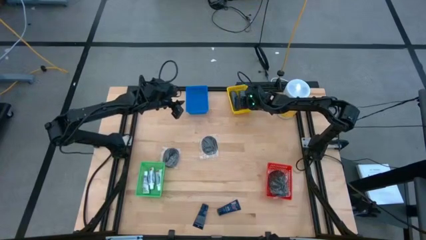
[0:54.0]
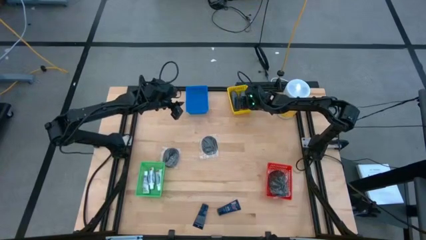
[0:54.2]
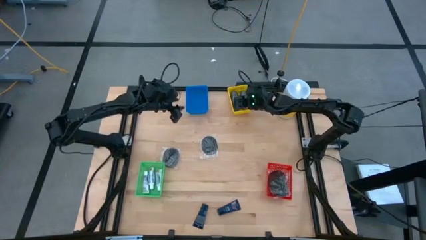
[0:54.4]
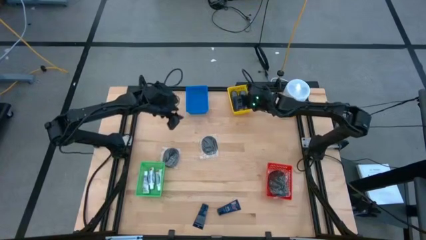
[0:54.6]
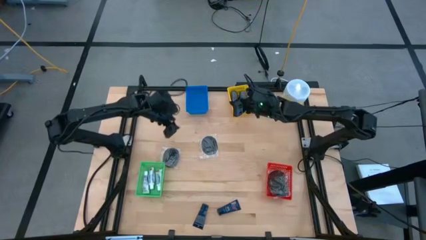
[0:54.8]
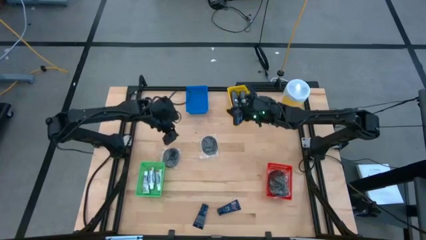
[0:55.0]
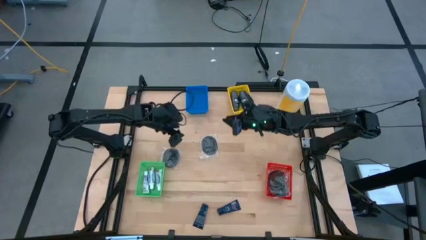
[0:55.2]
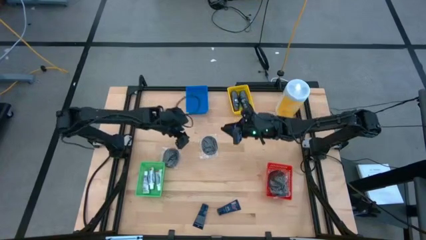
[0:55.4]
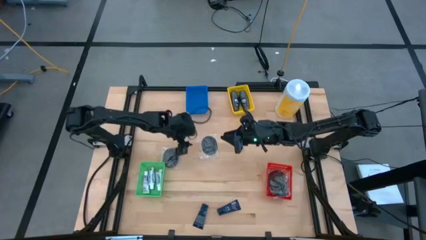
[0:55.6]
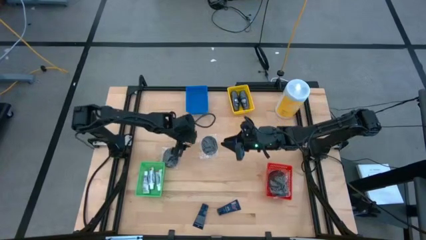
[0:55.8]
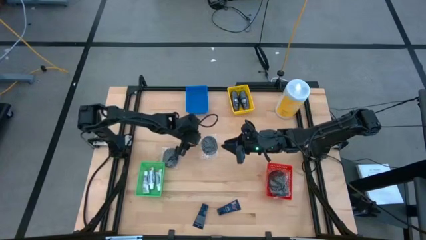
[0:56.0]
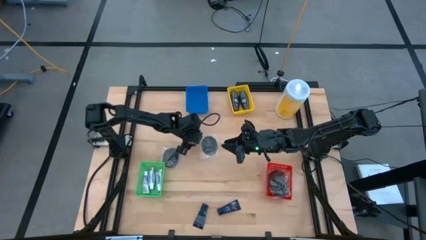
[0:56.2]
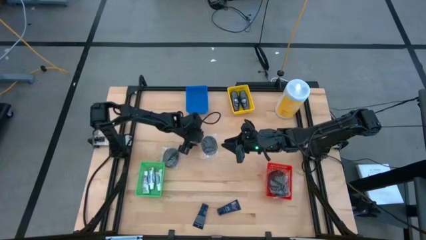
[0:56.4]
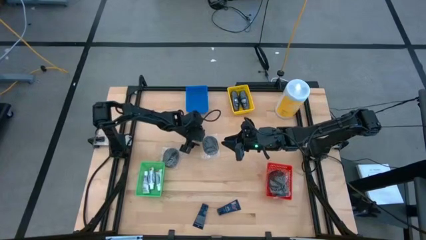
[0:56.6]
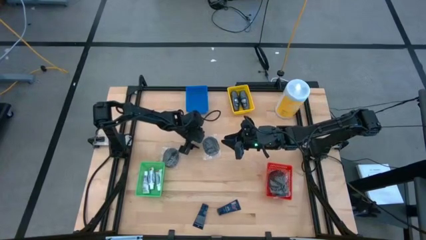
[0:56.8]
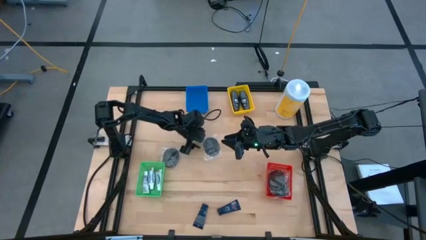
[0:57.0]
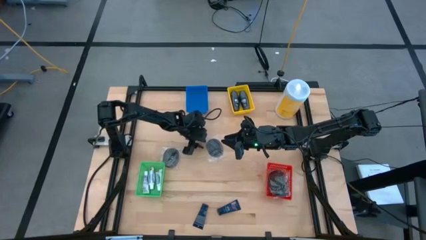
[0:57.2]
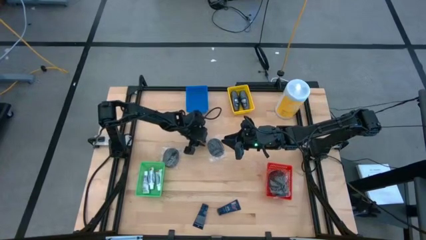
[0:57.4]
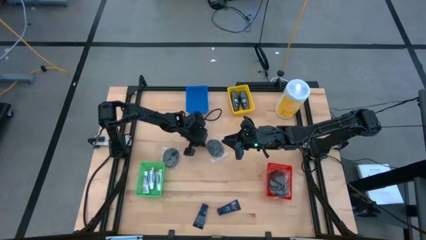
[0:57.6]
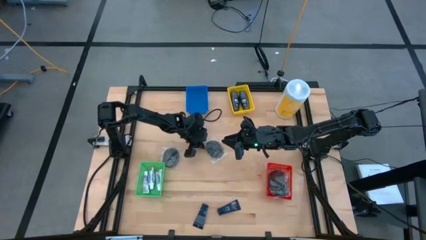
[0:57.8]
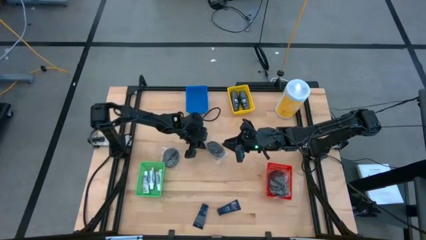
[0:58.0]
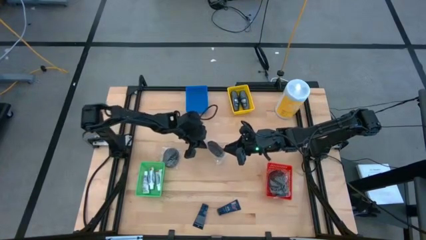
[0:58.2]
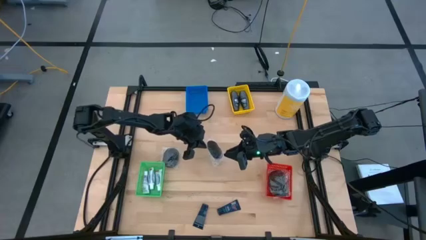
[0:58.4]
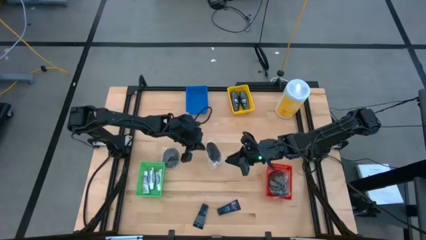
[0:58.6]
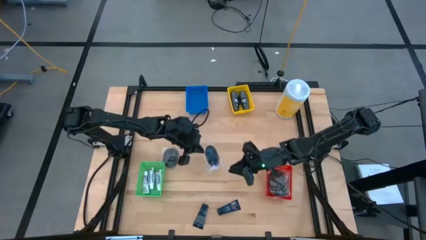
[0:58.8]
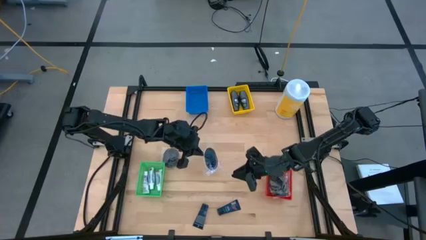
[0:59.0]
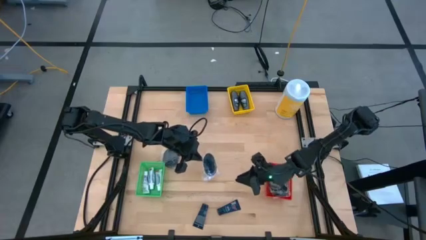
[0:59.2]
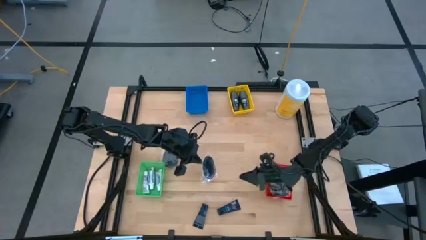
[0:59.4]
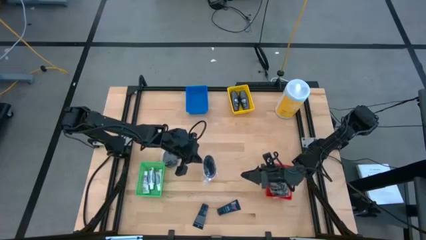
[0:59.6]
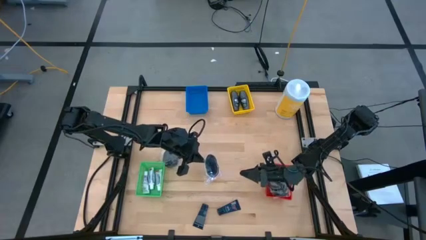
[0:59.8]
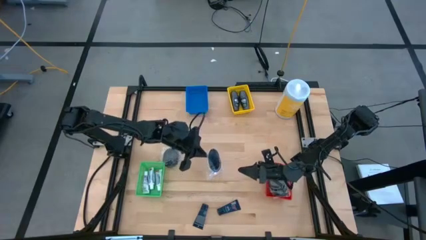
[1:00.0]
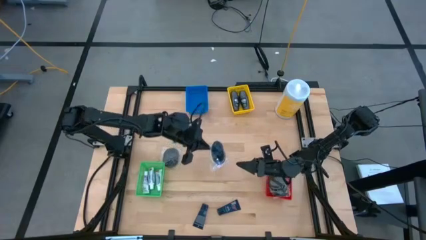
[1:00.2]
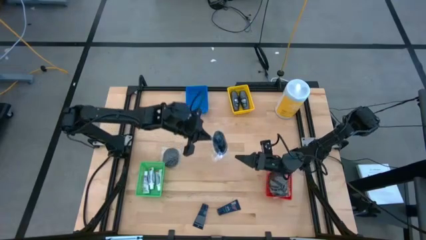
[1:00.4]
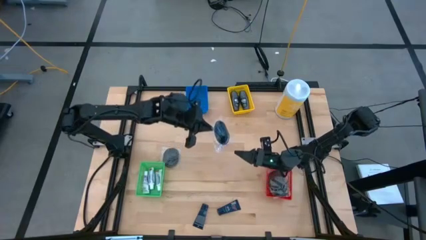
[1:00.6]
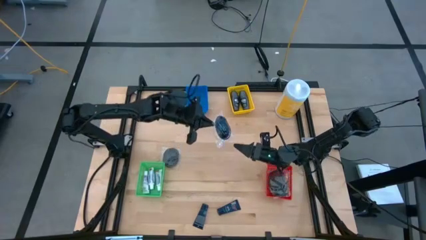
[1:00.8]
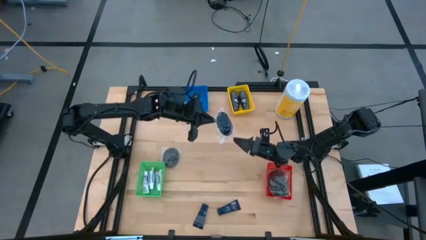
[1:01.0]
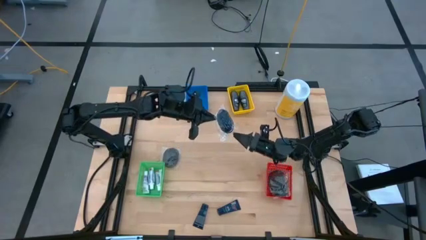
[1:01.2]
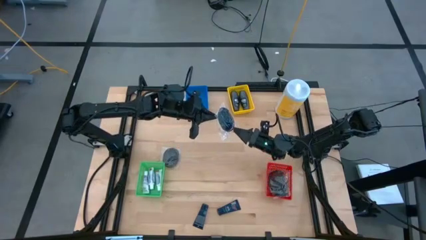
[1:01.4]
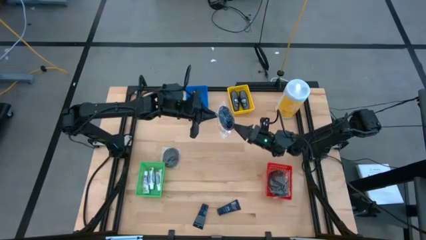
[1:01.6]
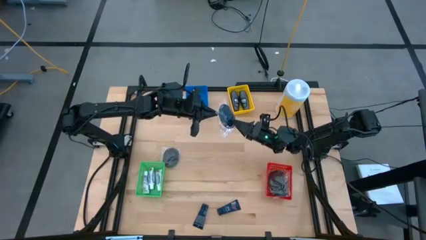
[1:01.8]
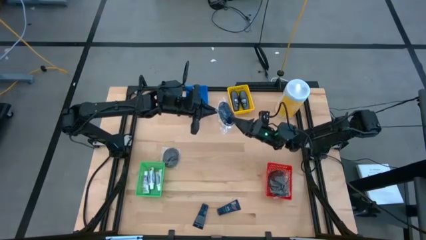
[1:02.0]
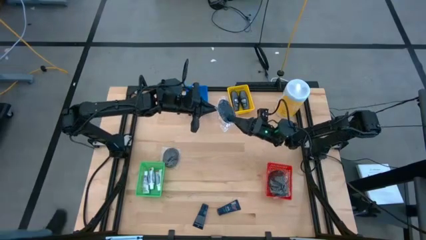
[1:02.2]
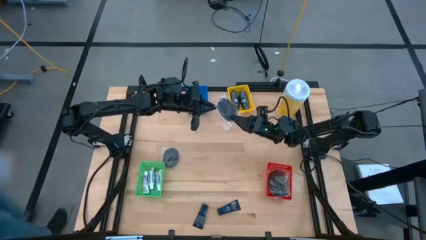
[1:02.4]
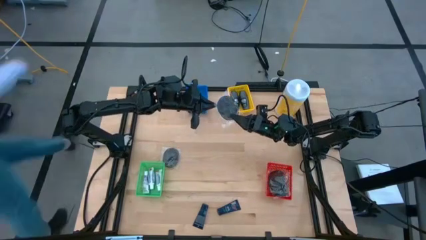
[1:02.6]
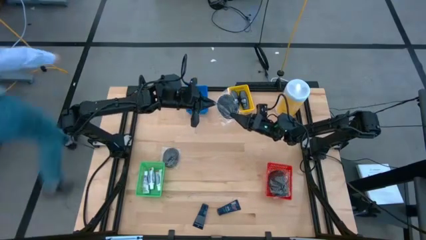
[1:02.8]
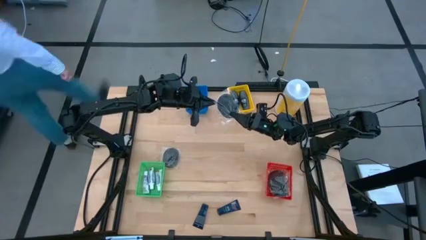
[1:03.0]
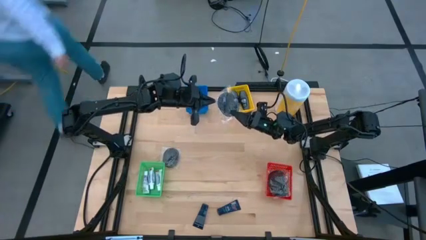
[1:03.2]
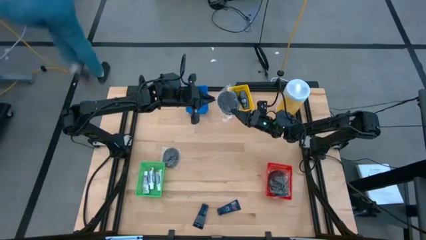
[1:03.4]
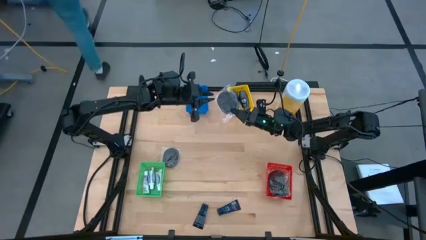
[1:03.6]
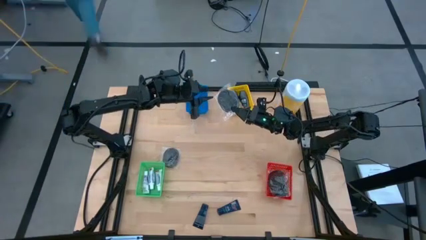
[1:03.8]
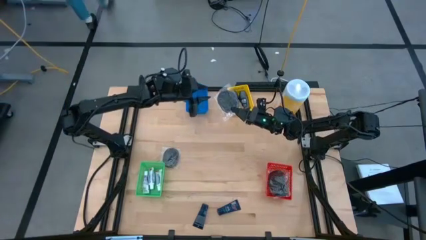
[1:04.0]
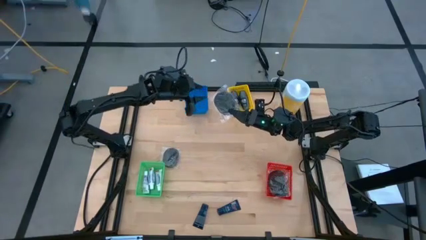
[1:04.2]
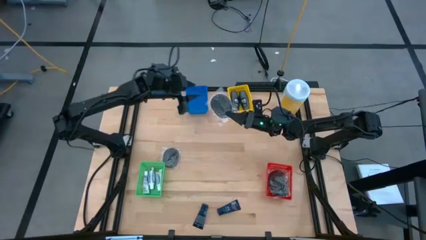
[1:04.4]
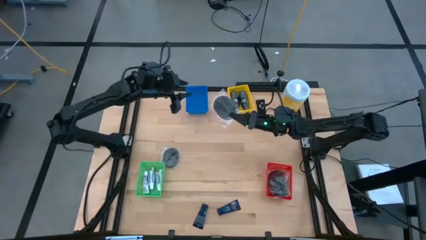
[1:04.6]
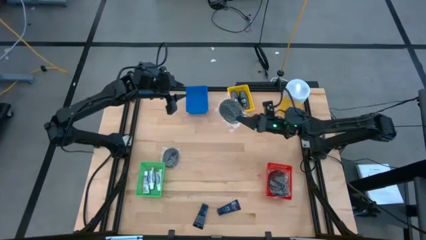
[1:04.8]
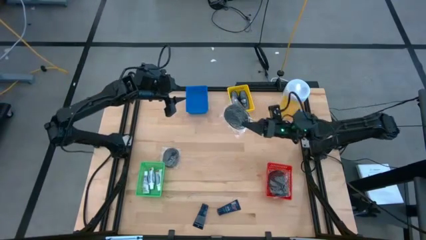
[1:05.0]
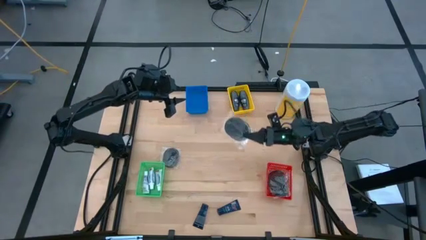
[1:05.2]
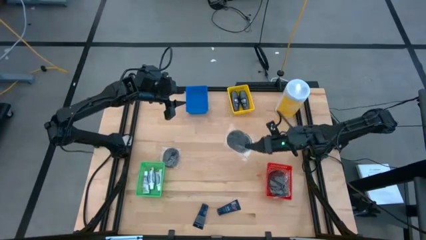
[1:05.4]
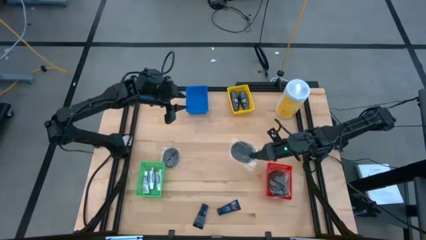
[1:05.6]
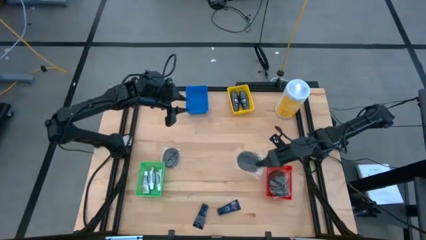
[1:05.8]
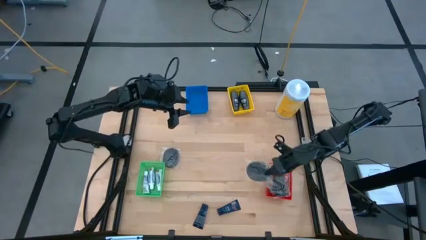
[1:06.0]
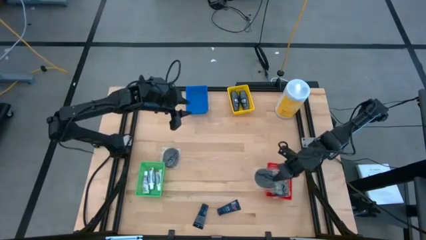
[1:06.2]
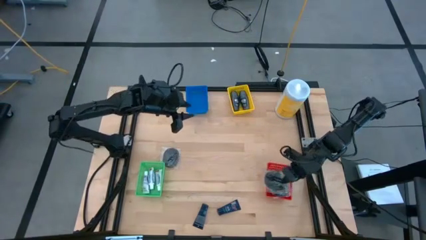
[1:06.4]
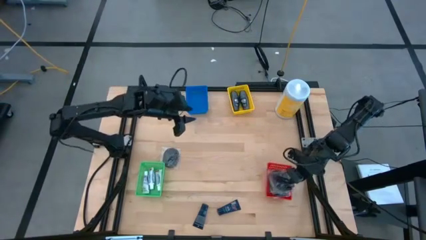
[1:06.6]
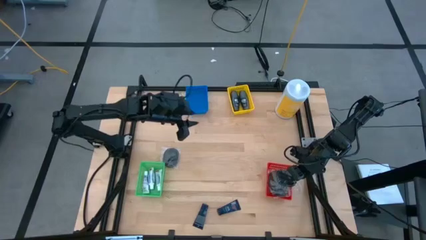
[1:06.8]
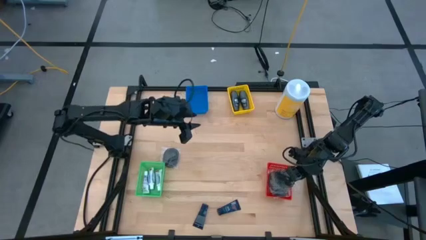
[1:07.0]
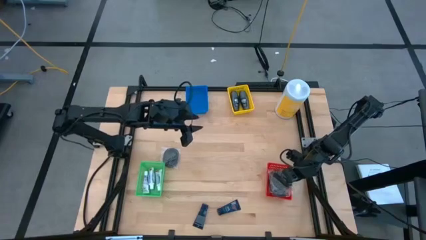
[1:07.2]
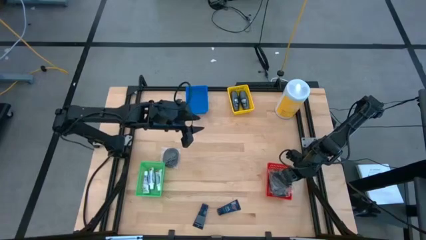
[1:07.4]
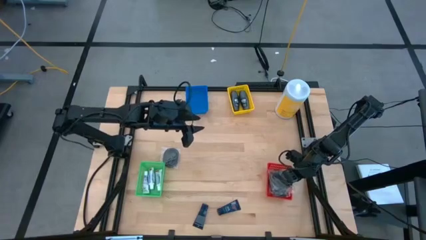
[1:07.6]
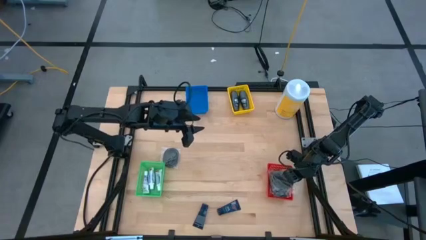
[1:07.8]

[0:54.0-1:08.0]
Task: Pick & Place Travel size toiletries
Put the black hairbrush into the red bin

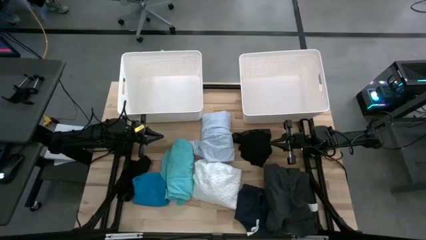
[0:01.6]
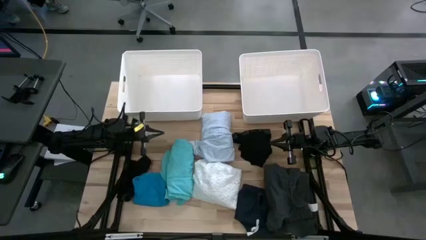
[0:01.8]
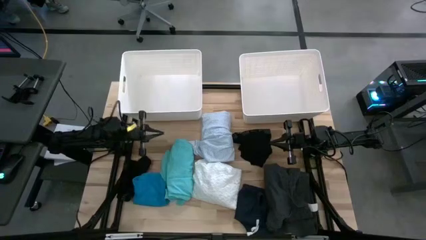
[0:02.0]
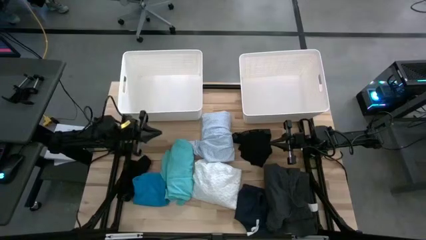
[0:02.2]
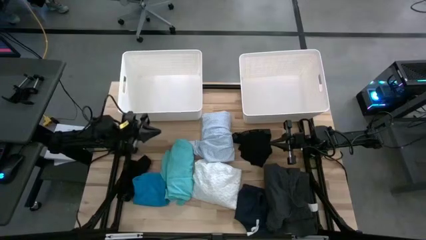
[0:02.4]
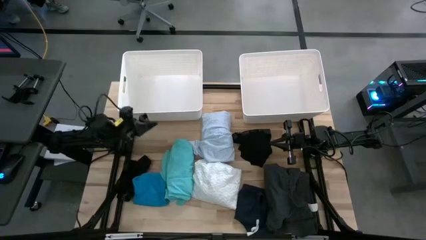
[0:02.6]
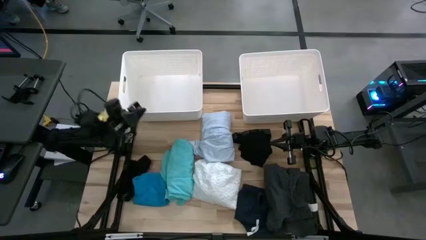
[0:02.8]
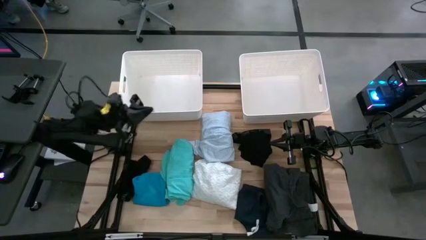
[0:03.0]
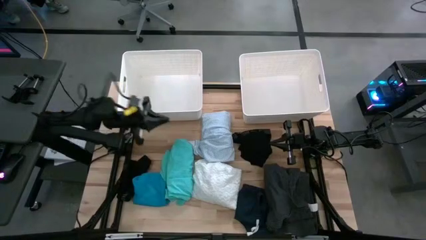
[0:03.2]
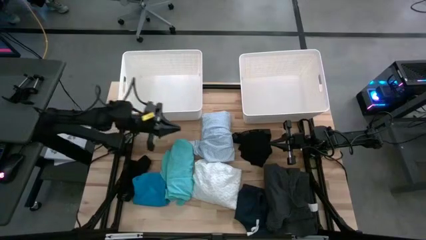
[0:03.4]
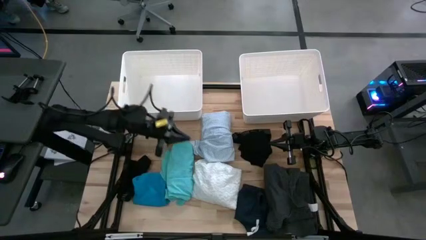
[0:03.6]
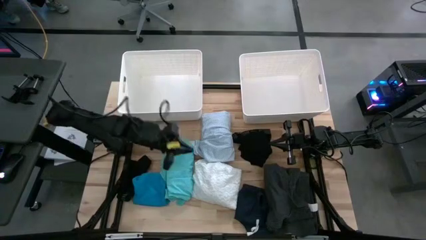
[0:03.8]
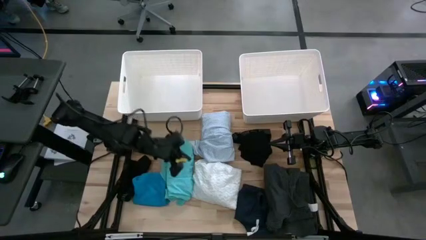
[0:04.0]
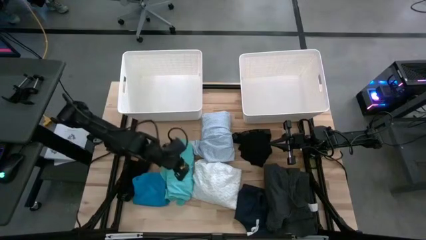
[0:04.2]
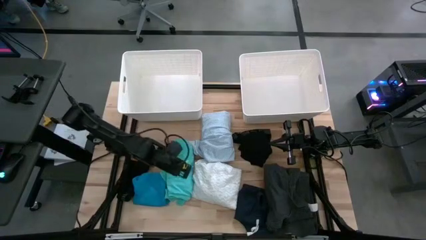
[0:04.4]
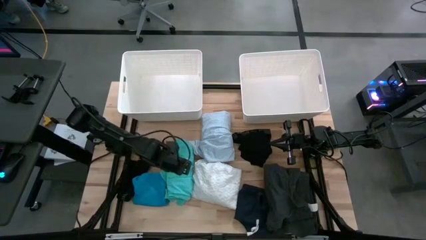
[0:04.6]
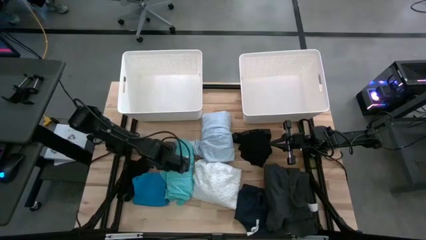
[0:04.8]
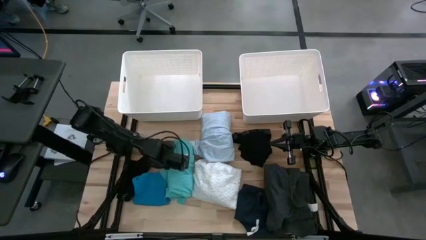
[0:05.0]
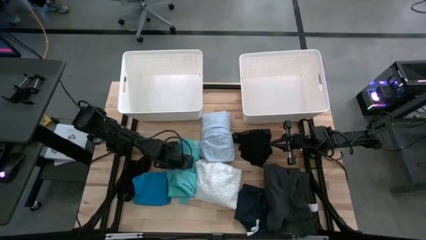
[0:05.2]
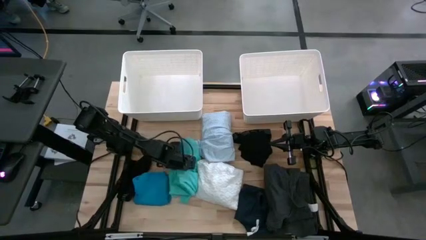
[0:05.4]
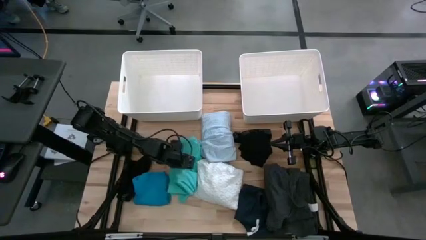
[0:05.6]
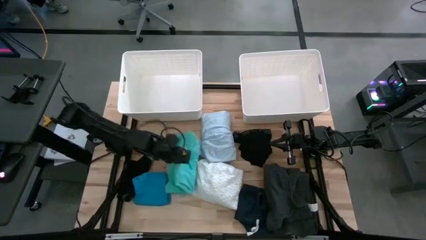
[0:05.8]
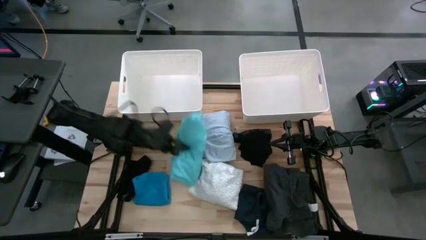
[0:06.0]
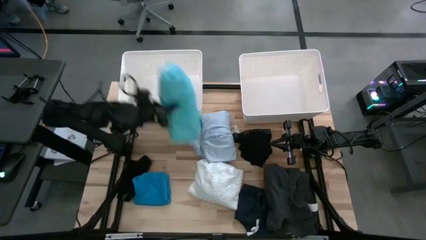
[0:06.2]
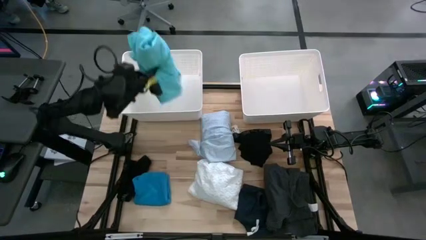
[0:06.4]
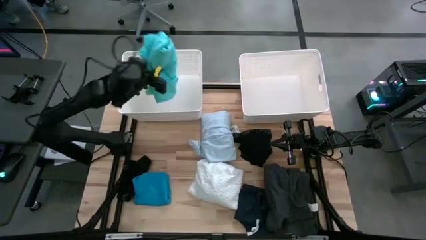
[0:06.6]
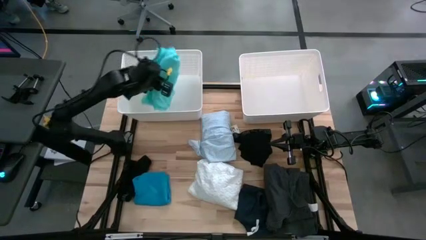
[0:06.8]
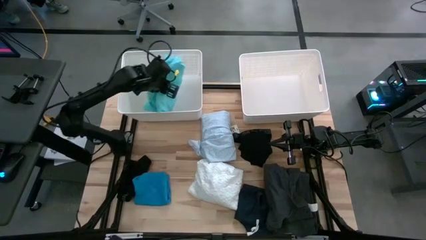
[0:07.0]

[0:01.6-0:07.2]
Task: Sort clothes
Put the green shorts into the left white bin
